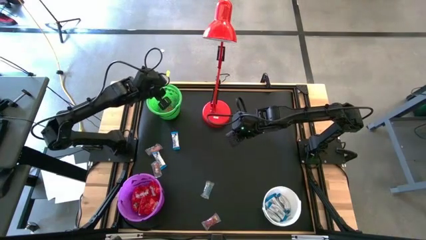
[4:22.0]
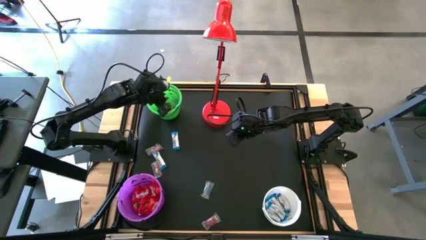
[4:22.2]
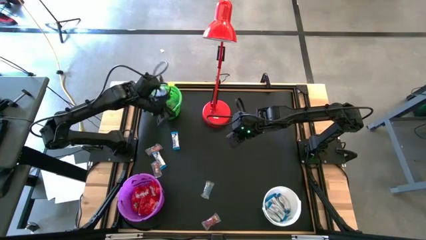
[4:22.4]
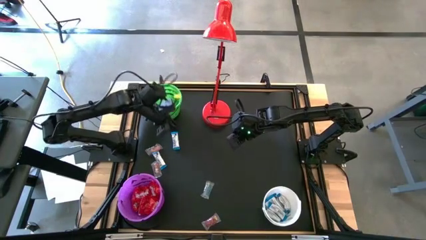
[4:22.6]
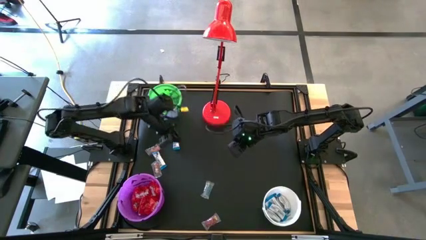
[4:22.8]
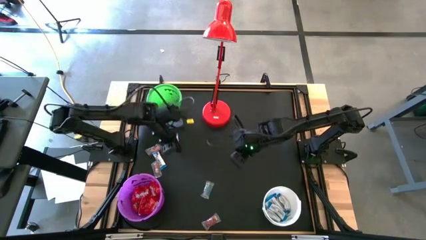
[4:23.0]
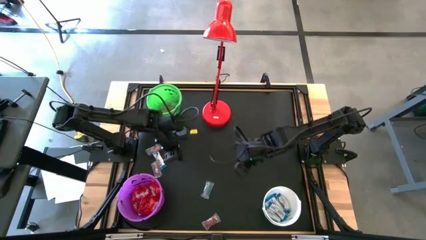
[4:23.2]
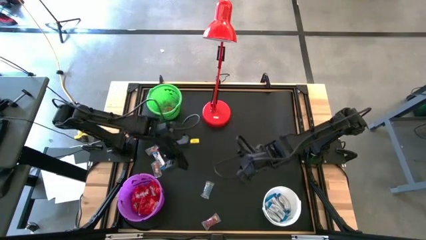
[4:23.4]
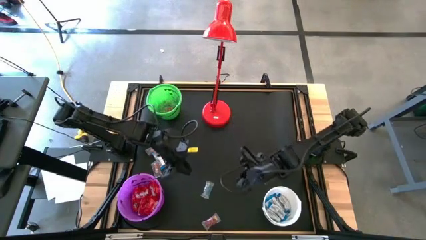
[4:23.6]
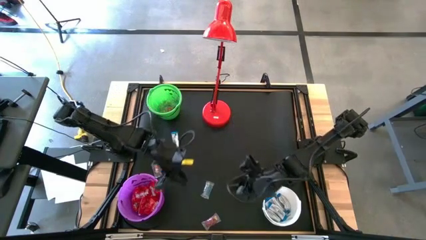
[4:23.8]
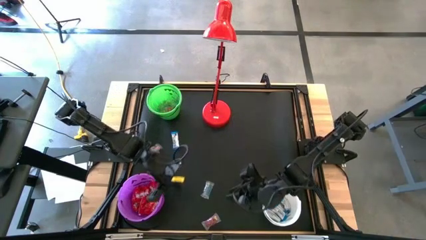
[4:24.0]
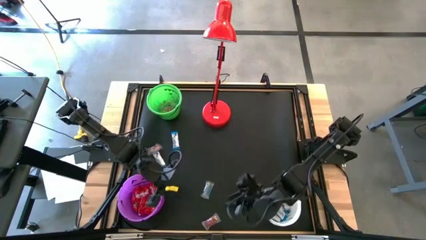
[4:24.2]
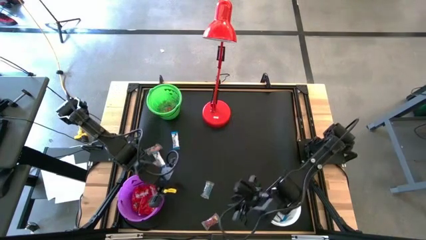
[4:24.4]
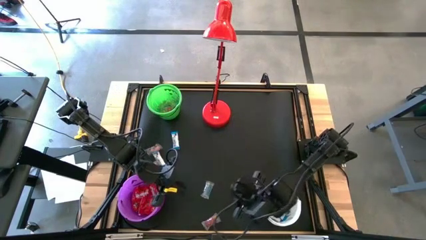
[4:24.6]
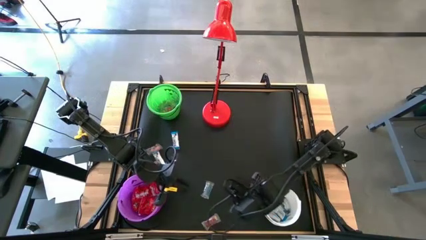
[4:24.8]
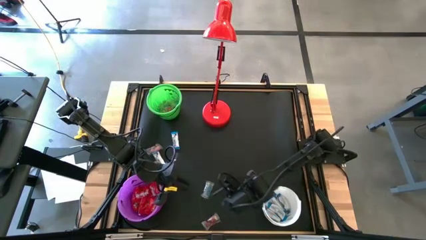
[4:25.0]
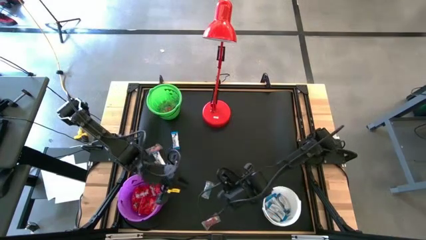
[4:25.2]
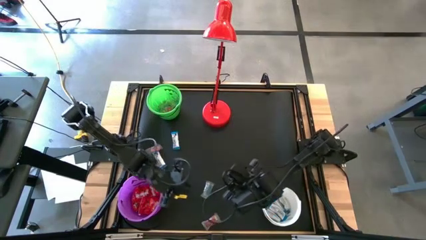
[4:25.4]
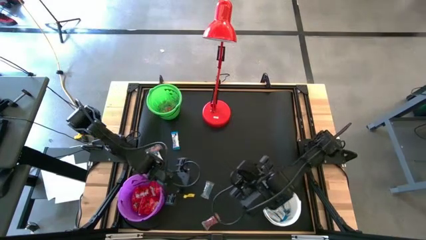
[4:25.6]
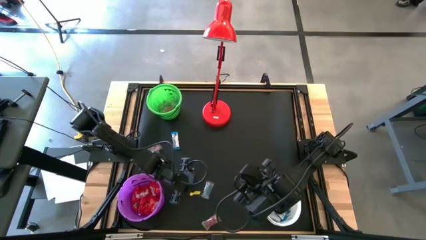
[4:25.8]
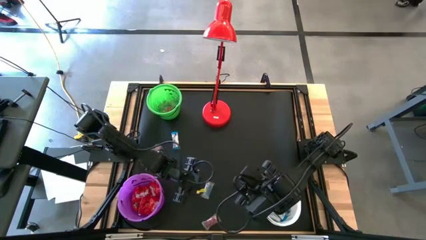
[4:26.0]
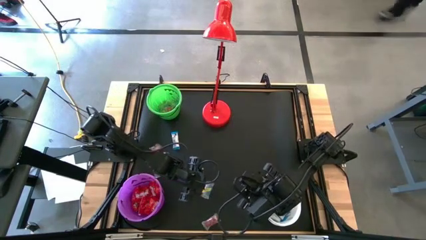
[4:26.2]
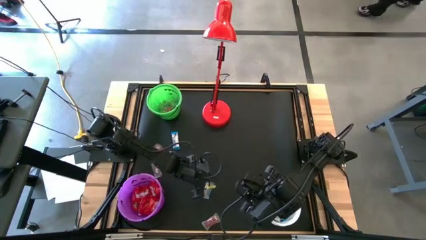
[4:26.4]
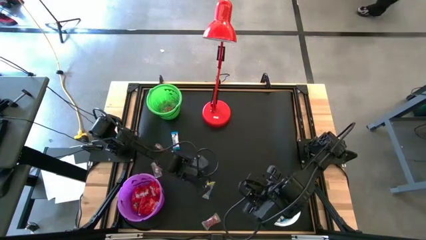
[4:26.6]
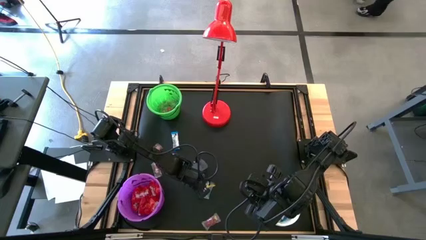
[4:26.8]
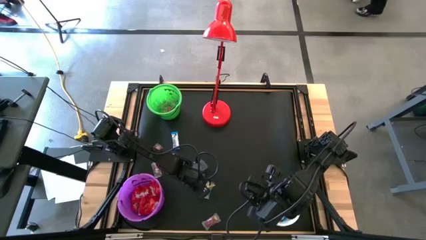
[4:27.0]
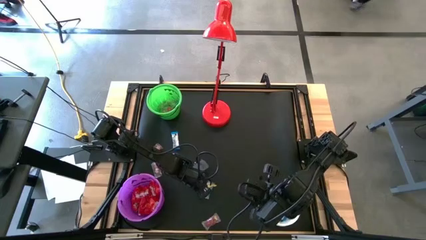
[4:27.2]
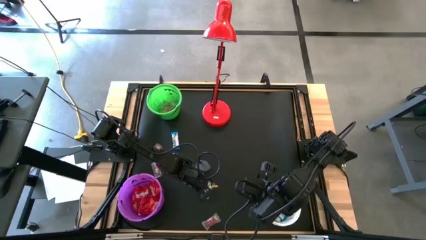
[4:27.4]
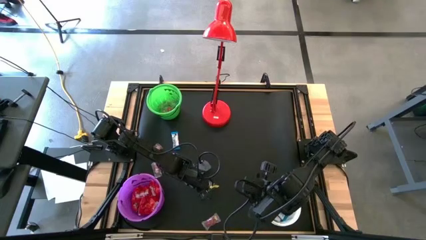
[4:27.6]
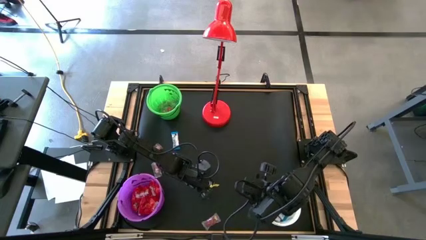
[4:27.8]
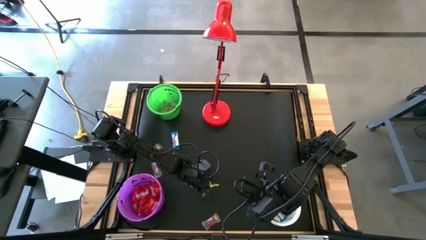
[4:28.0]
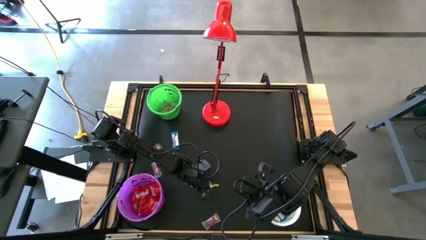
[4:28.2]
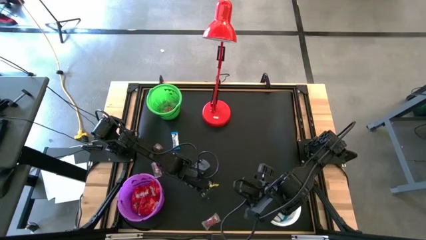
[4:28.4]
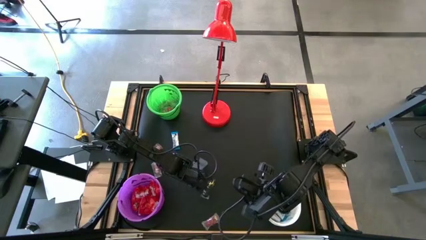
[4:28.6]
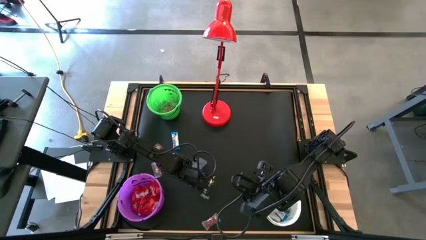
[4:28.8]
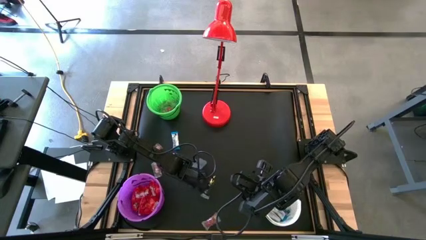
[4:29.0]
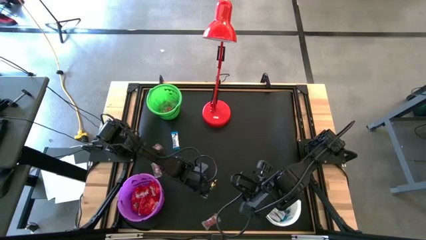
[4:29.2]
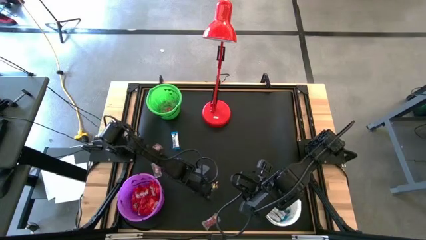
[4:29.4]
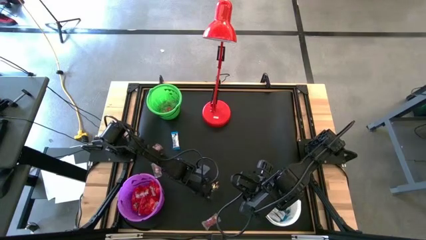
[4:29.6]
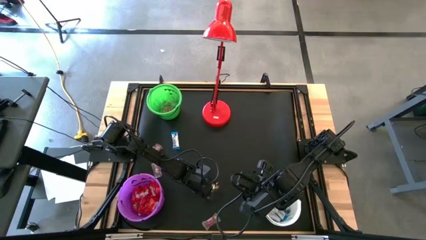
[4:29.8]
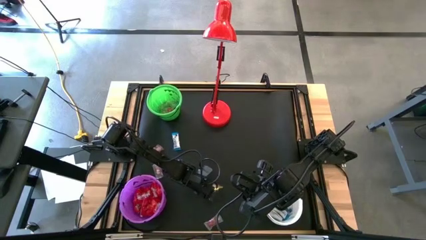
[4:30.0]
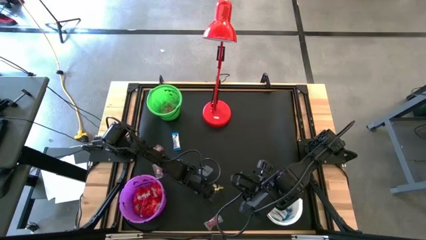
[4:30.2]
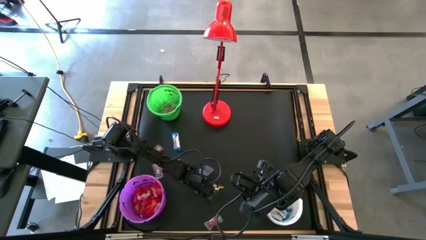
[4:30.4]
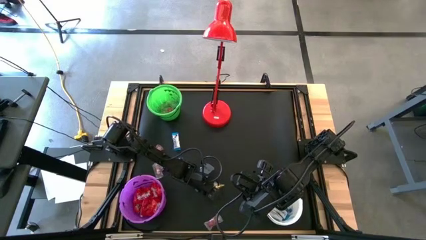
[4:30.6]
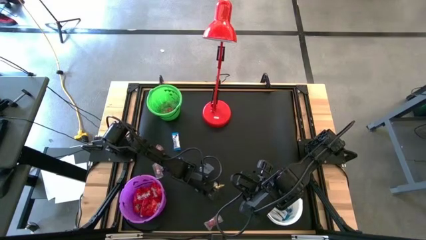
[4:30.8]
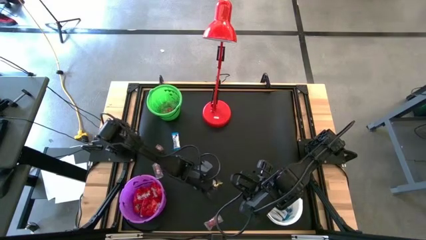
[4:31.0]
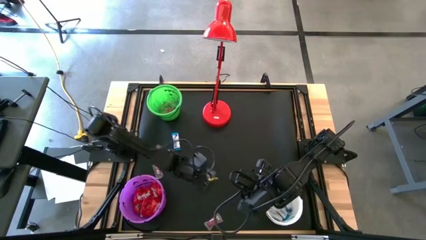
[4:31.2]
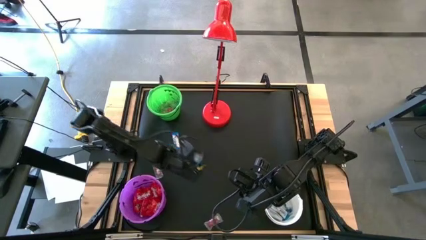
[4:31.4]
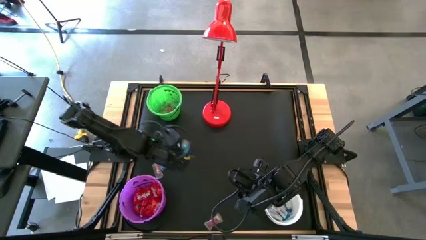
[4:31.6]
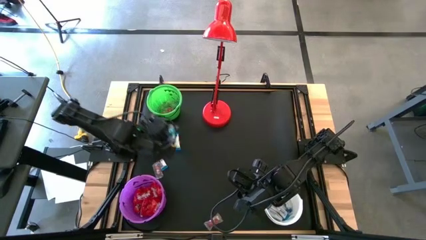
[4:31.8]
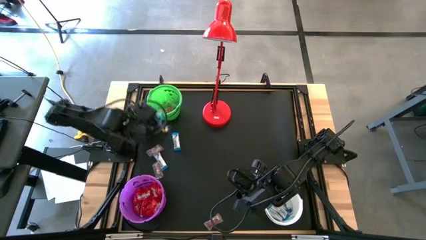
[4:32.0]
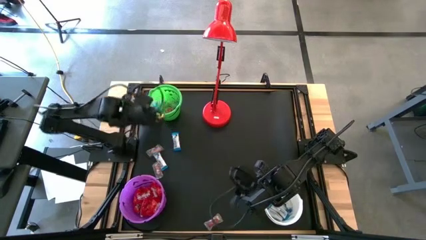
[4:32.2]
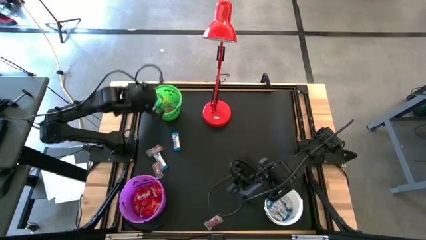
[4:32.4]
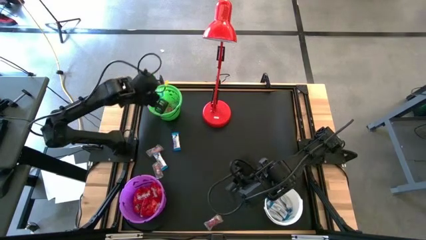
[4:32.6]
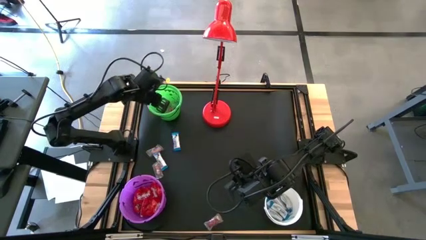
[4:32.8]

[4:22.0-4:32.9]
Task: Sort candy
Put the blue gummy into the green bucket

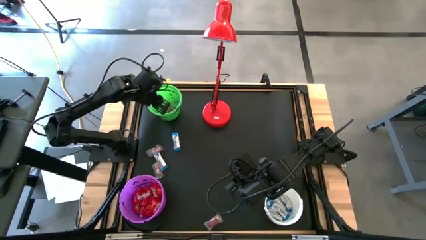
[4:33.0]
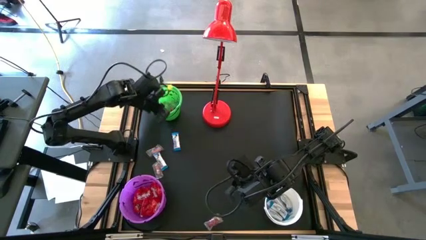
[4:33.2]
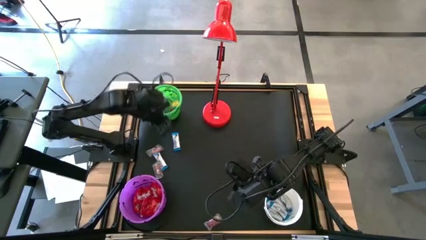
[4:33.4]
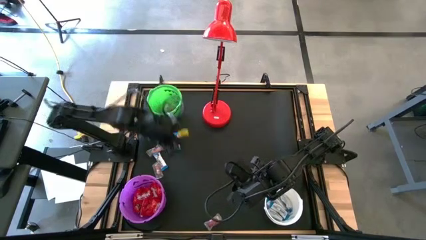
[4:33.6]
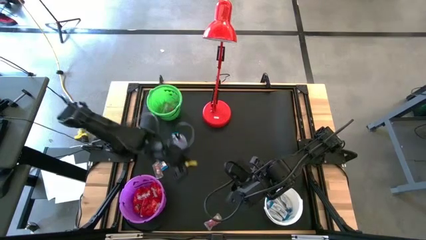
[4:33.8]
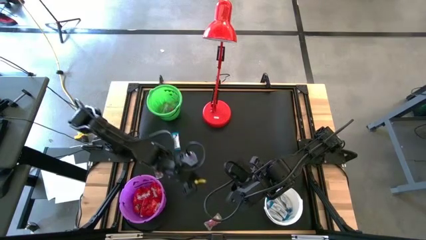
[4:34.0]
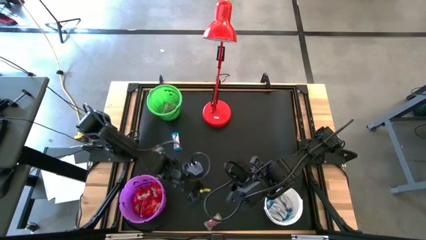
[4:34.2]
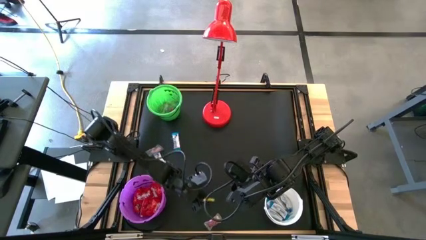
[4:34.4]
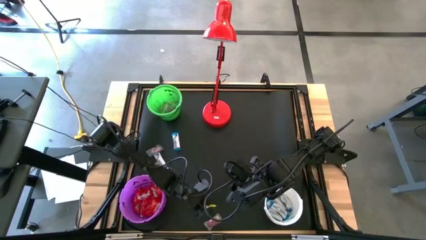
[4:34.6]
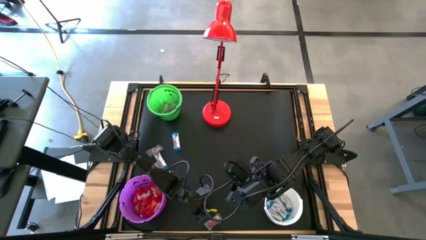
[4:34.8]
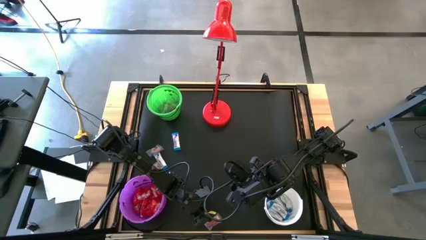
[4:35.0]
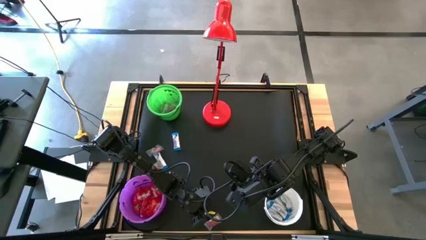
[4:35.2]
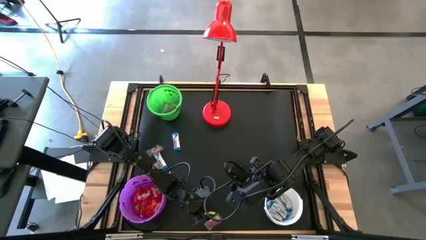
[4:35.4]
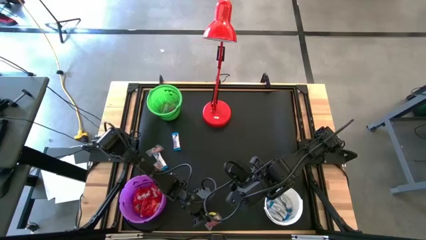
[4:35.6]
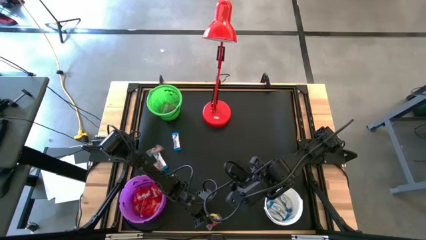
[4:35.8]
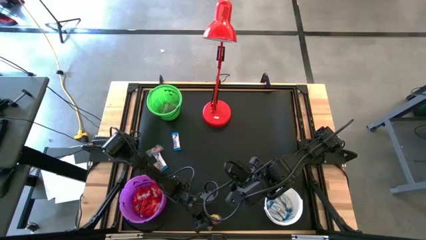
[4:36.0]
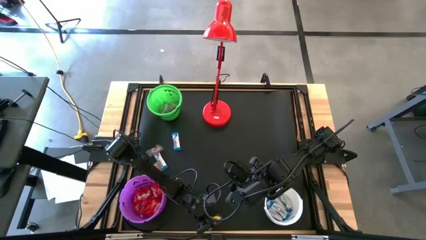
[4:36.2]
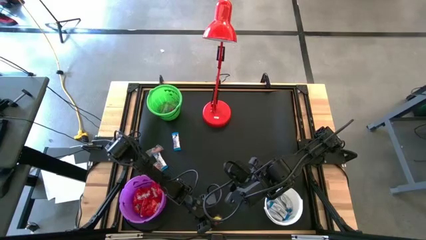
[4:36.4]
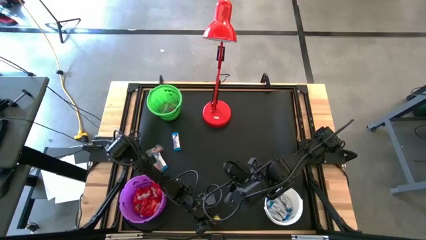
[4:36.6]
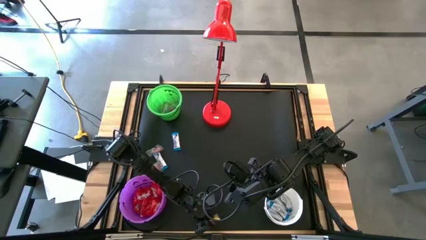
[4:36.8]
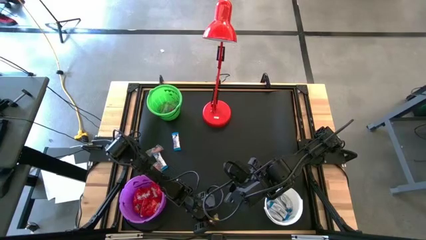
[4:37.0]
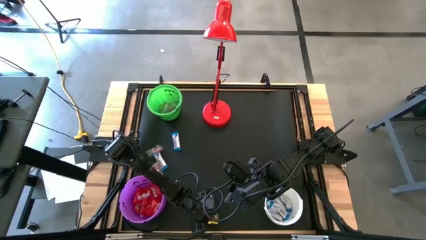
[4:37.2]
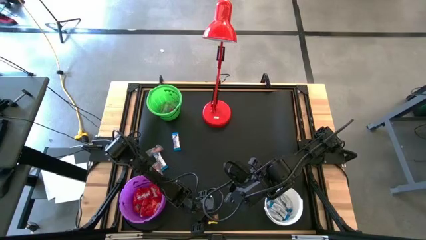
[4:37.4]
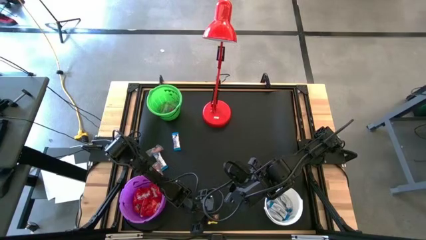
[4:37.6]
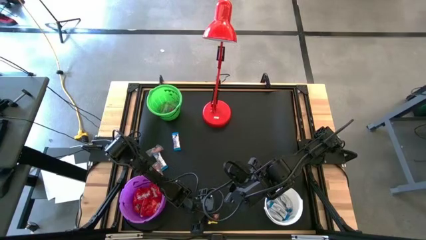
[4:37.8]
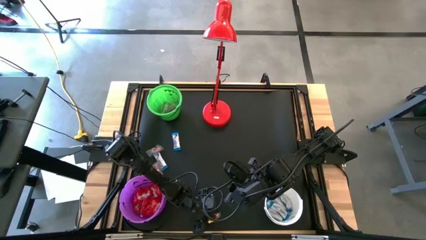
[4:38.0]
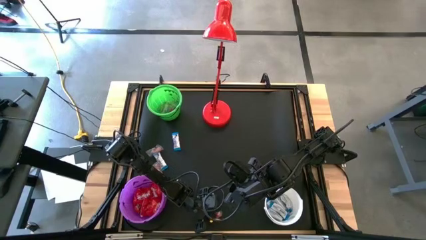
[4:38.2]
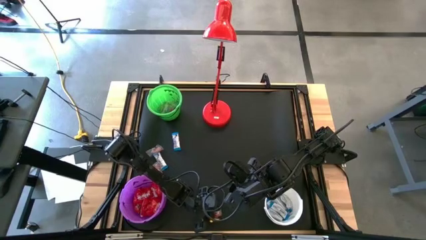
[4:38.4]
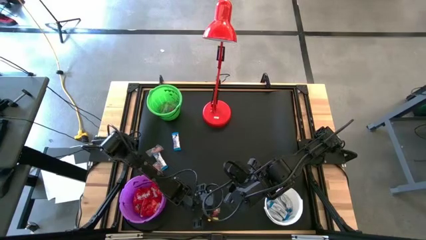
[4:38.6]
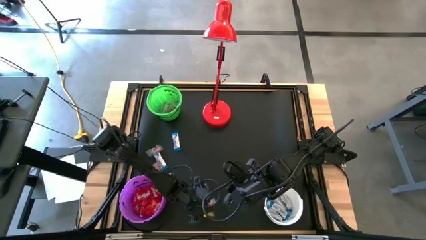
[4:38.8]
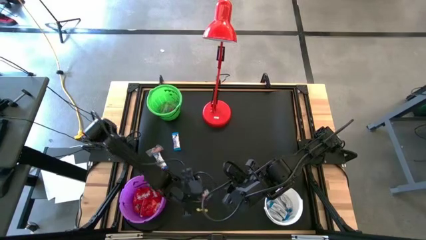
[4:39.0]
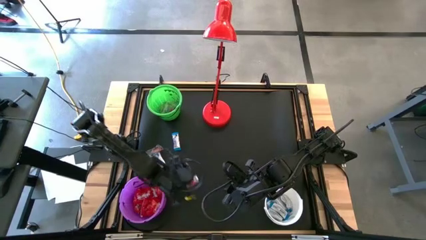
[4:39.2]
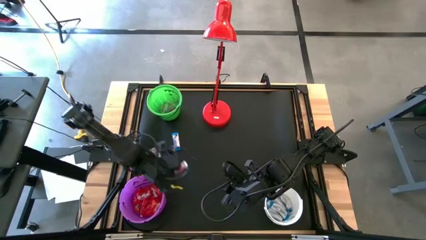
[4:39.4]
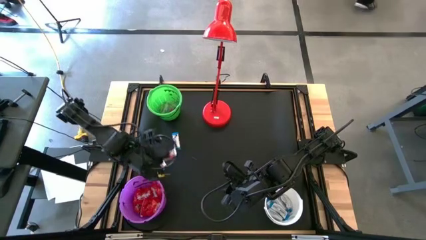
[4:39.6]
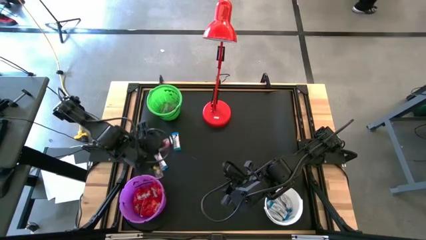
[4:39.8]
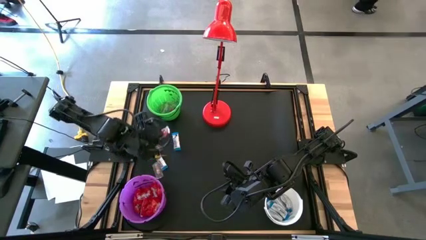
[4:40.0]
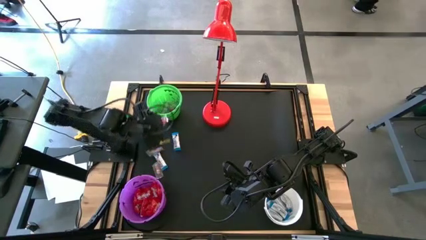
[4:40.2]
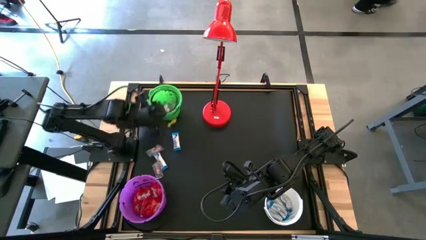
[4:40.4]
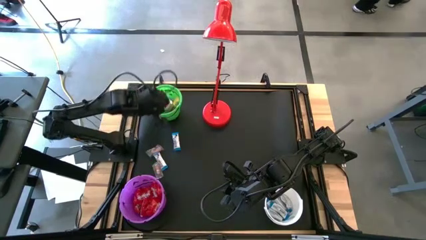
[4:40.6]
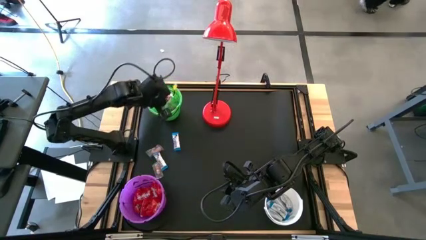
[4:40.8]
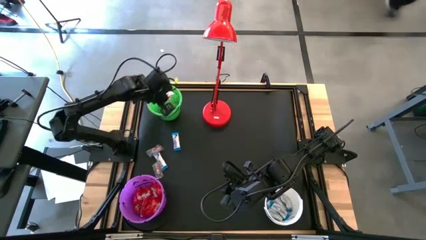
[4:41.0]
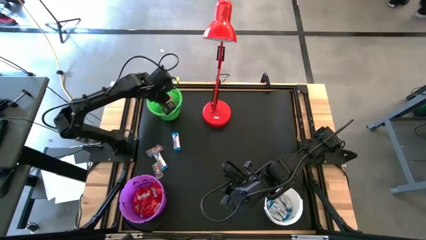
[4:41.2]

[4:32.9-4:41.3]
Put the red gummy into the green bucket
